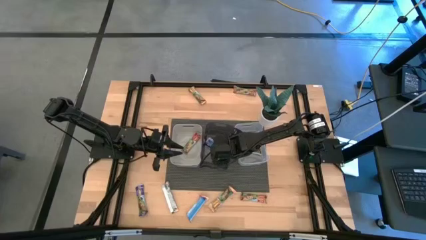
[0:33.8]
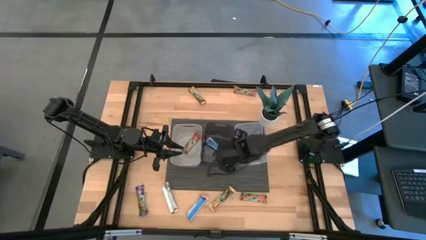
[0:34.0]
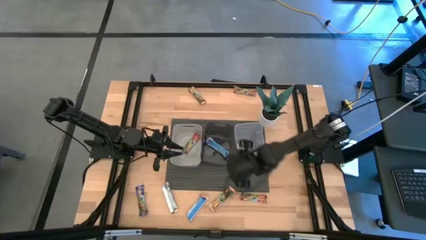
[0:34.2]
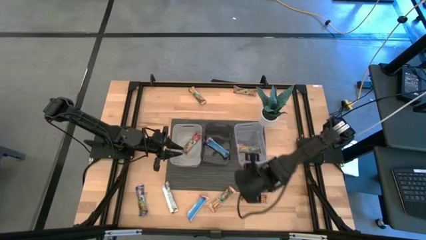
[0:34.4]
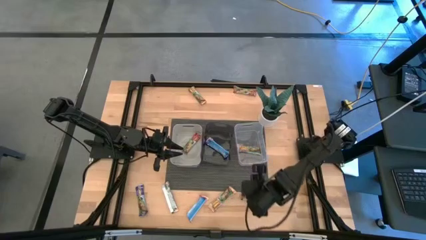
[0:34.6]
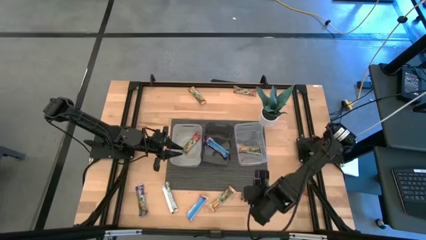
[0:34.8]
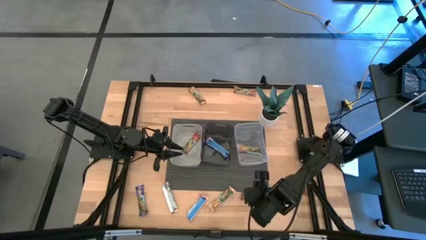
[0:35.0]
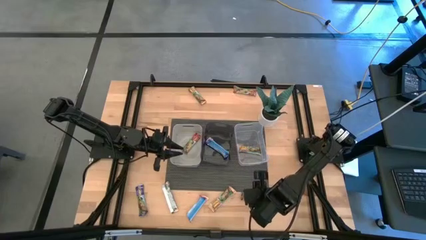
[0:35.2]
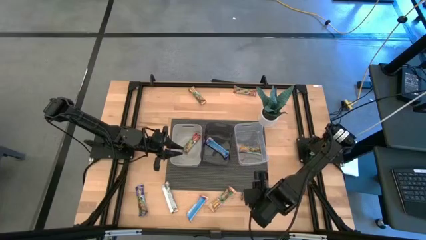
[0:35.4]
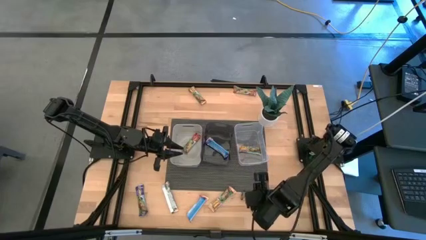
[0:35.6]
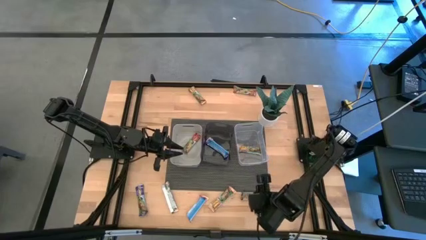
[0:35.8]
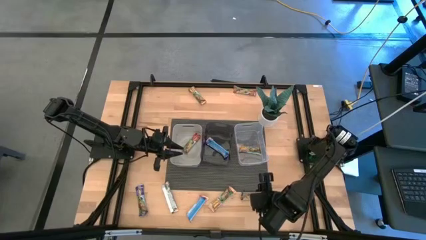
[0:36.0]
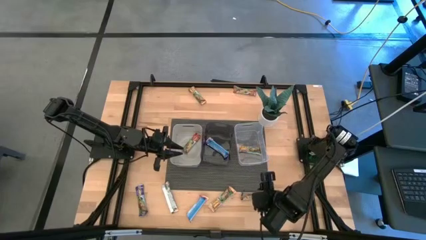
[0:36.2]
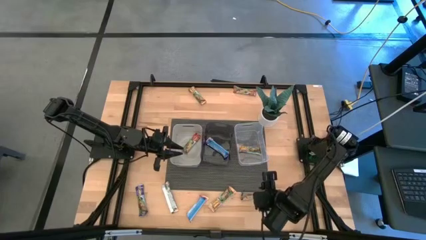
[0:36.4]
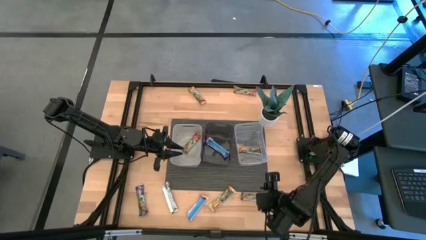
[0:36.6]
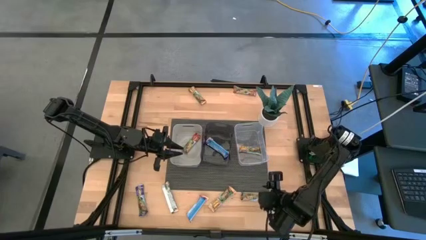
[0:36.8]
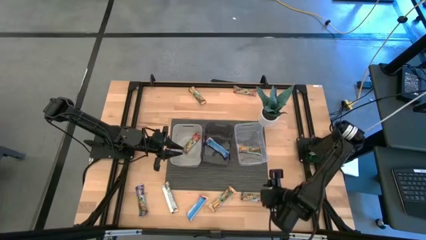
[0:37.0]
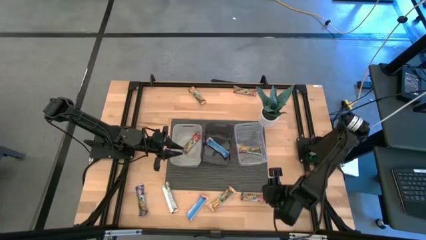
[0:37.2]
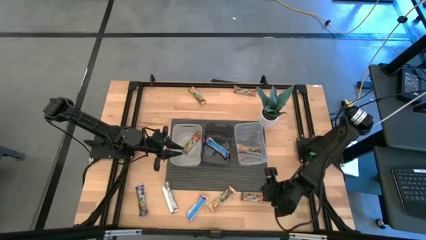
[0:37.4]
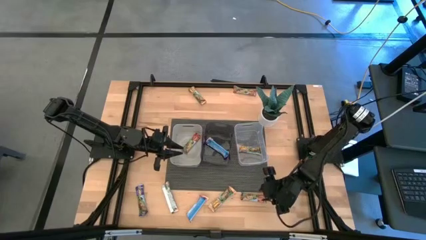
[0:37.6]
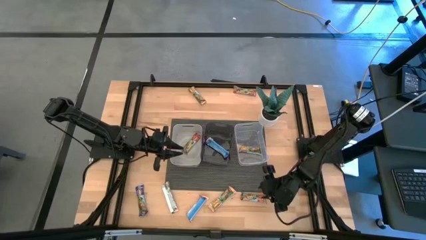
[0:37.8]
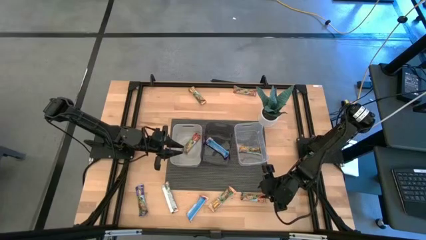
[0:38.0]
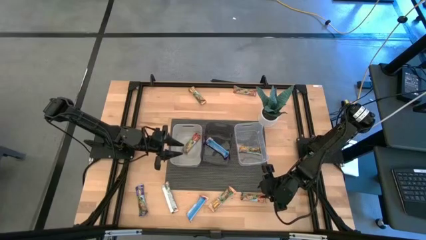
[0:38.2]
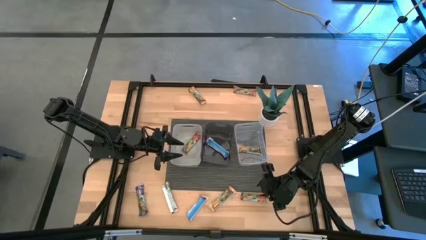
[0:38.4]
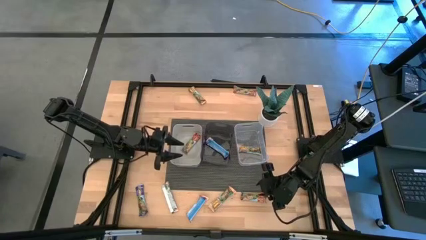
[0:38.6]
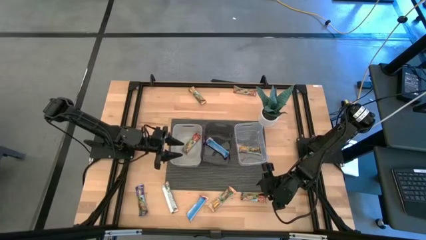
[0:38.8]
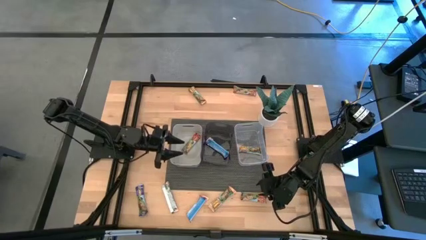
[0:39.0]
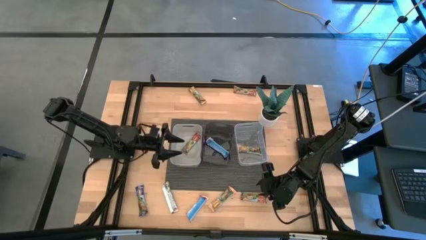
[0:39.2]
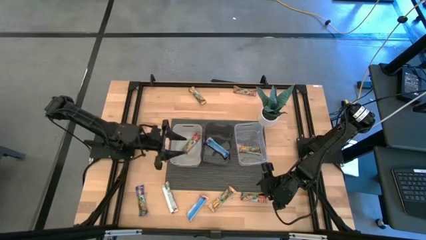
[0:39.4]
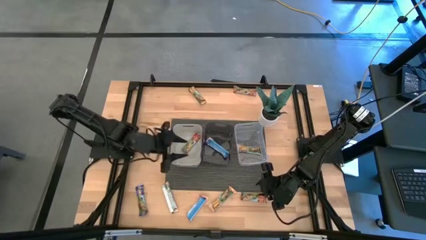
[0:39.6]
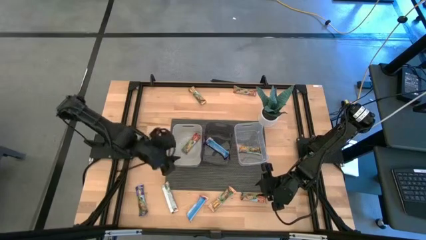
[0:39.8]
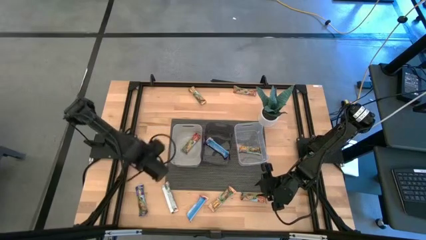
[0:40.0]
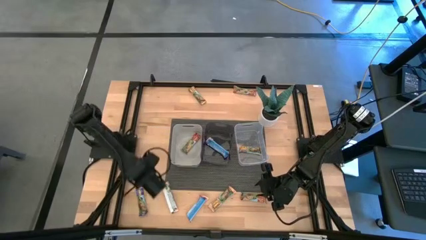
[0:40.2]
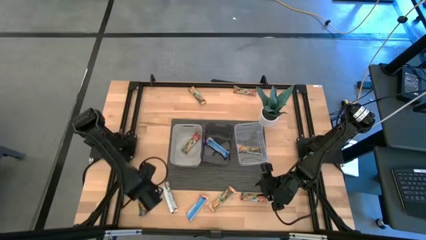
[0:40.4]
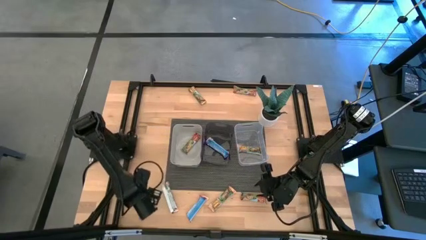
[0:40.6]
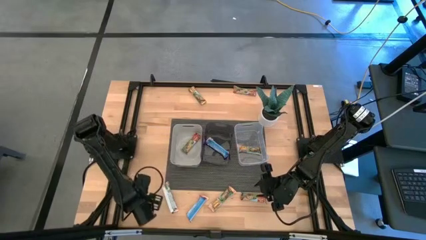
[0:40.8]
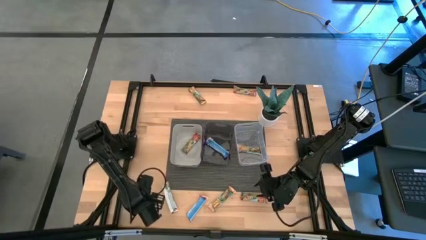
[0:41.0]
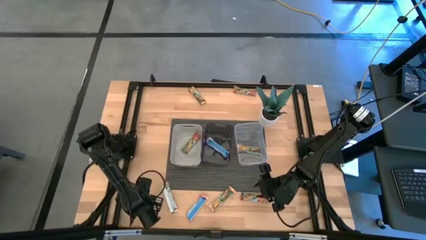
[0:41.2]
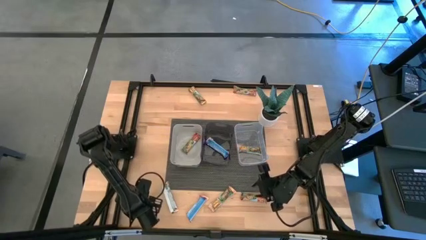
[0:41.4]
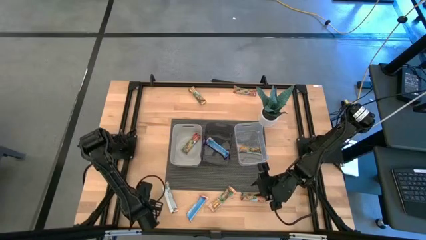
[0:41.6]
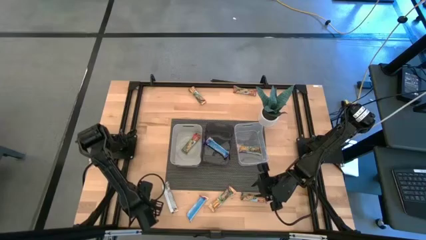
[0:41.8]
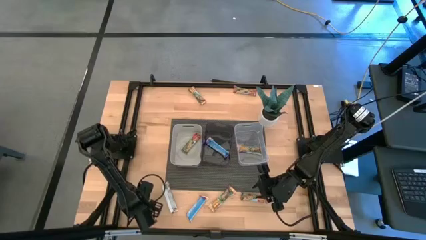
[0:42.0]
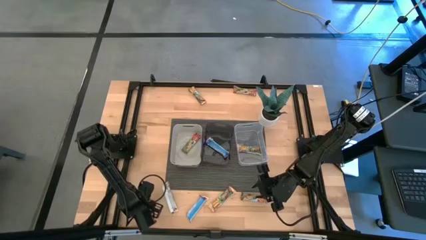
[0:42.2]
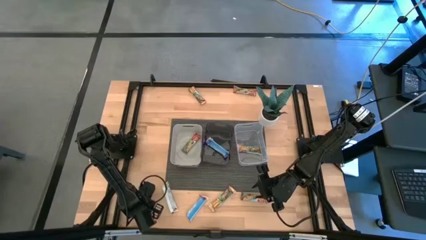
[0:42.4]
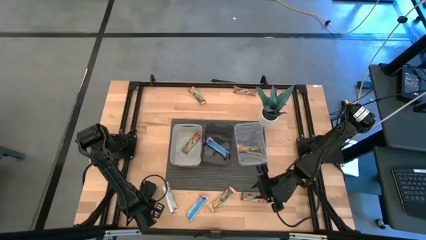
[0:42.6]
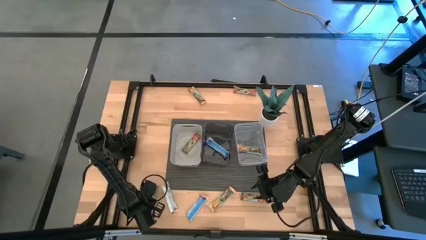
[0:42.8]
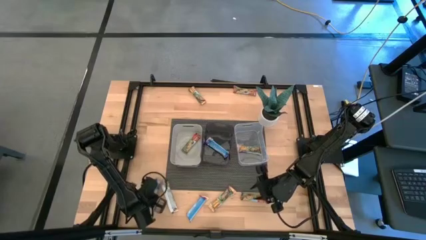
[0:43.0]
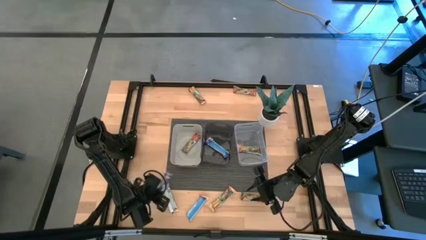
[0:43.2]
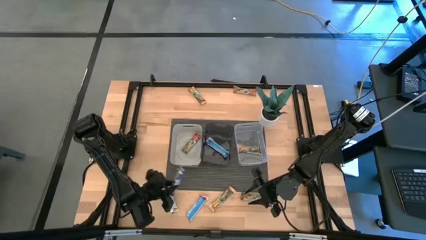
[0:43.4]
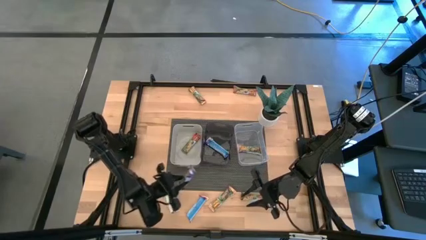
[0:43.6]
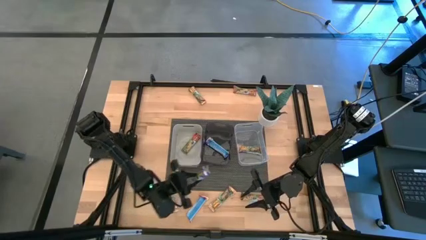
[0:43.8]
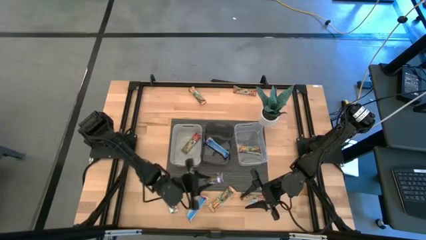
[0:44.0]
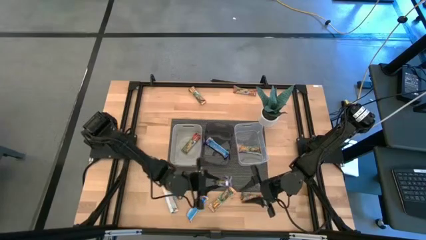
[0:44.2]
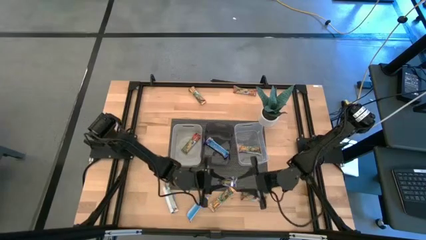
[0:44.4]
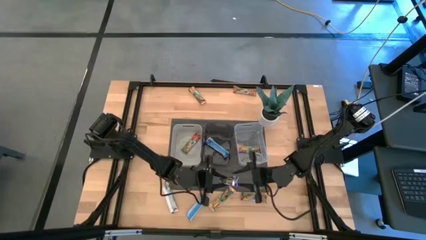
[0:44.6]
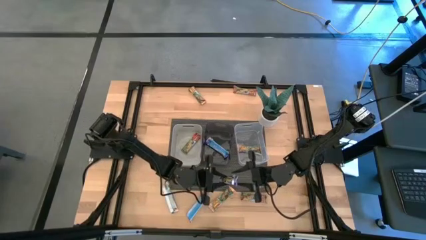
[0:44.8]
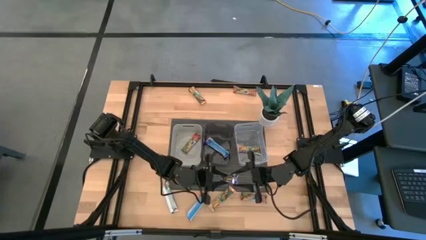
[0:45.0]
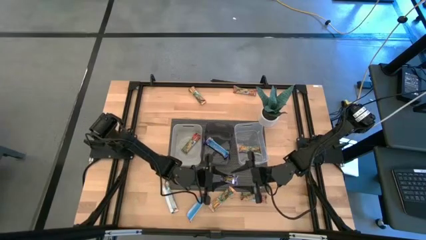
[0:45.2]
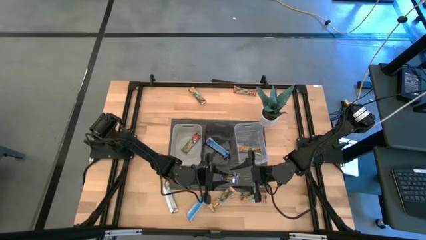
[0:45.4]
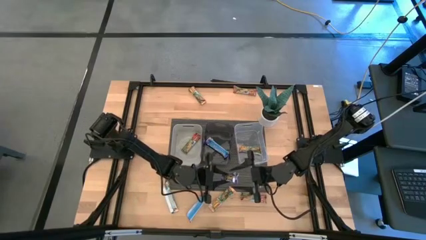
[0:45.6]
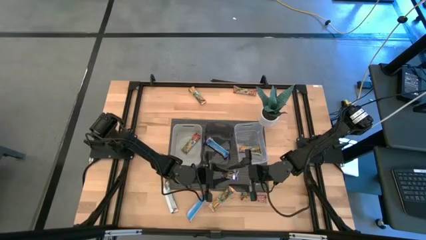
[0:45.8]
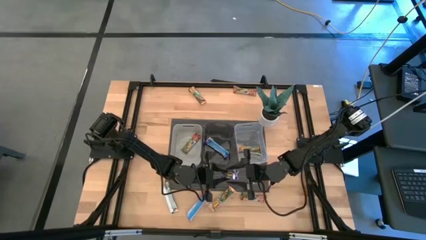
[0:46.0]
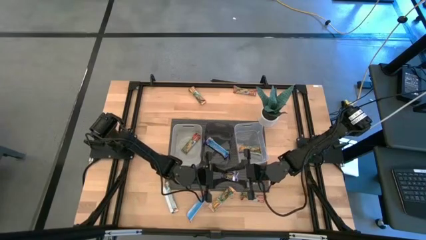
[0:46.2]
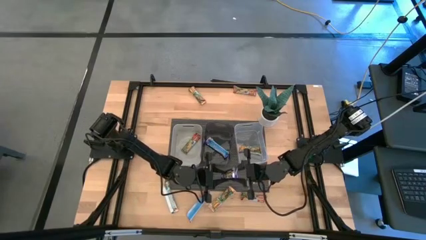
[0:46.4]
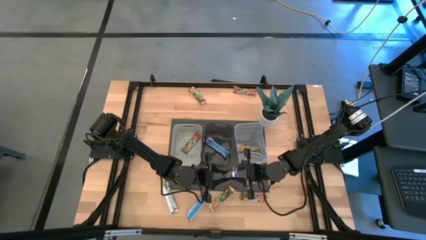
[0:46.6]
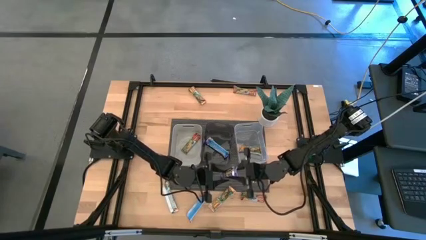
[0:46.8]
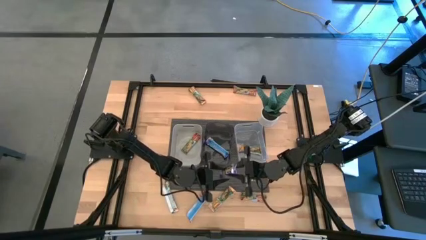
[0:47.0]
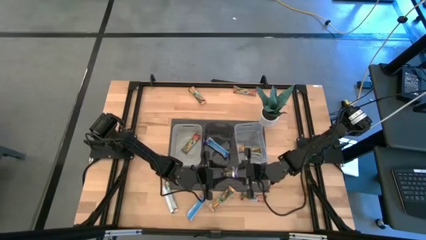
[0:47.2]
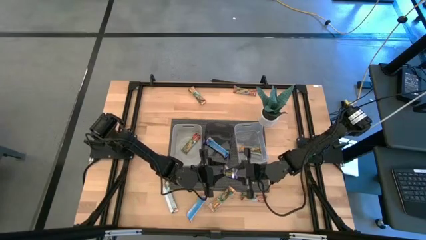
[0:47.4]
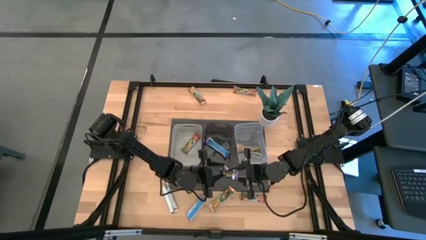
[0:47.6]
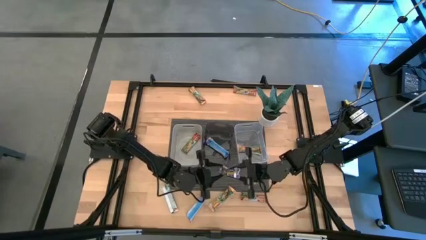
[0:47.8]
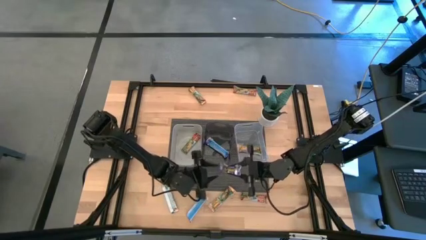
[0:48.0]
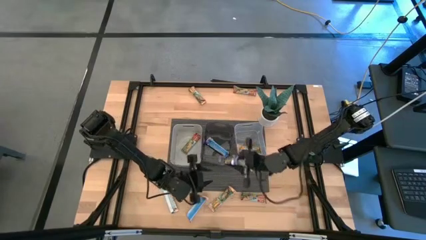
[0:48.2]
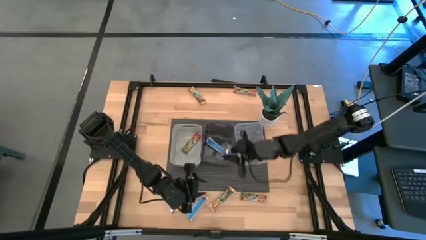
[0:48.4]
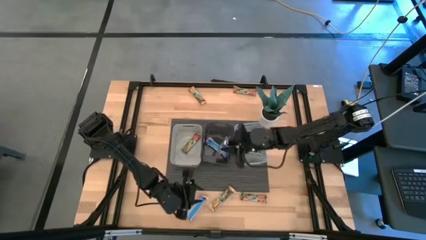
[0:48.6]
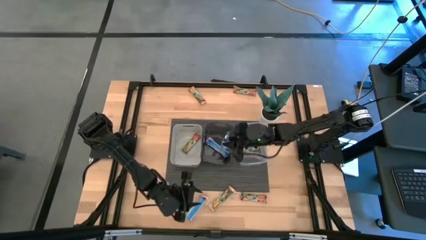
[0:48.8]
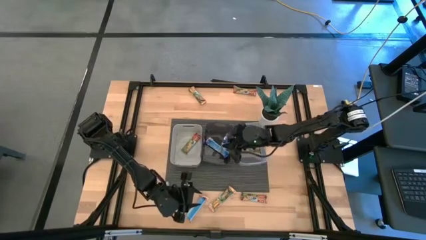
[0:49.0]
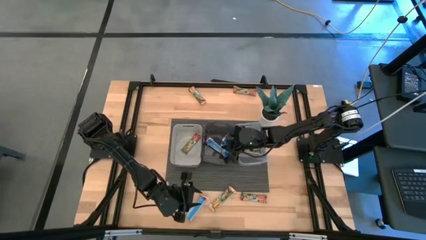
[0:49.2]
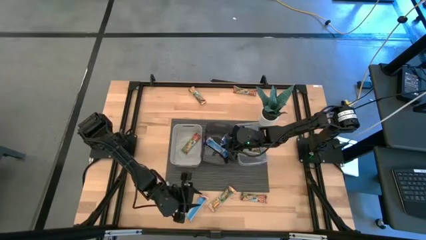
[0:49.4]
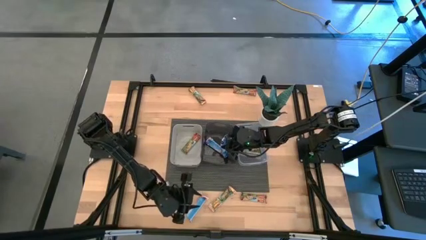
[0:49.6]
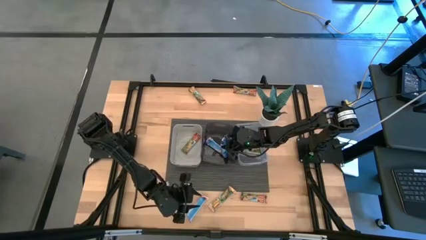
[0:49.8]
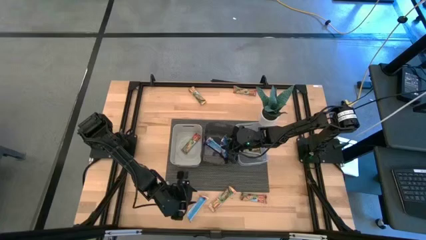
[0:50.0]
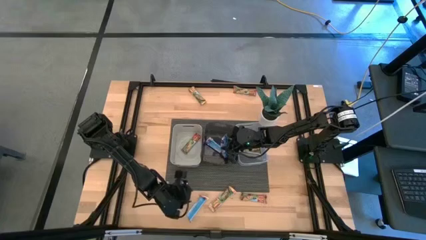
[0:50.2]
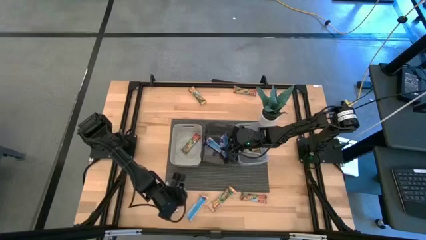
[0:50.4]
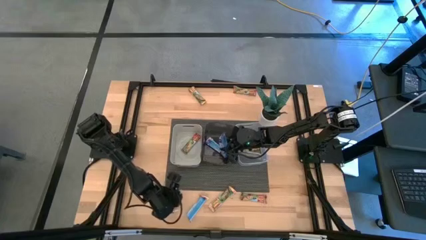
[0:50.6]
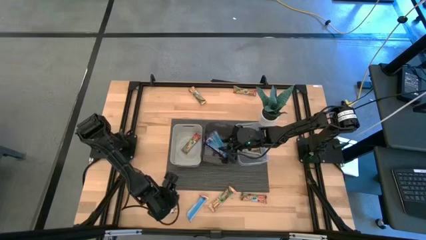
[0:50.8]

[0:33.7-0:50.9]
Task: Pick and place Granola Bars by type
Put the blue granola bar into the black bin
